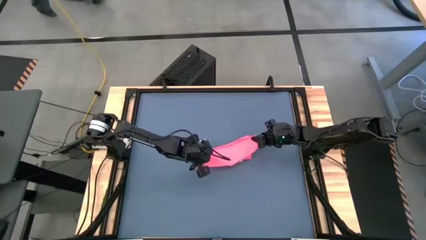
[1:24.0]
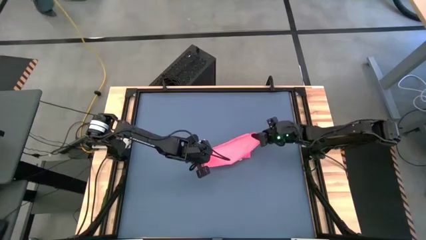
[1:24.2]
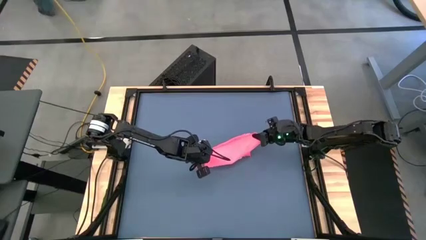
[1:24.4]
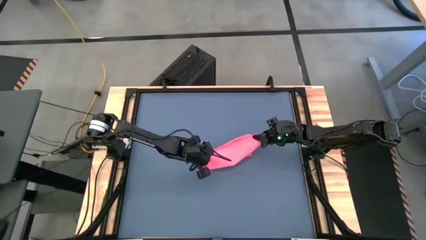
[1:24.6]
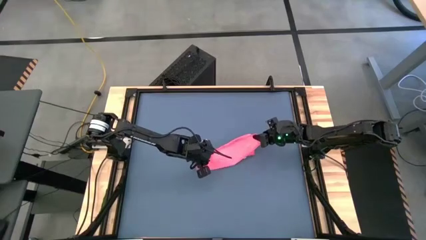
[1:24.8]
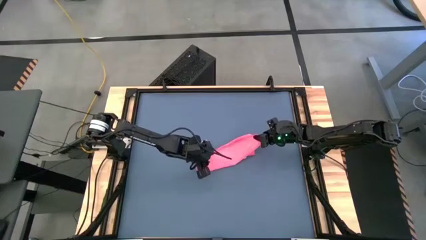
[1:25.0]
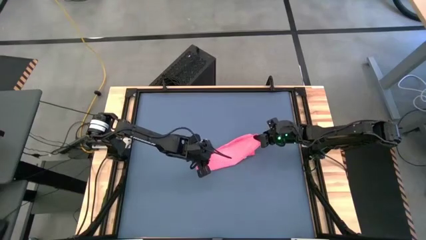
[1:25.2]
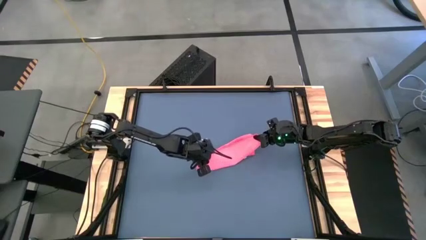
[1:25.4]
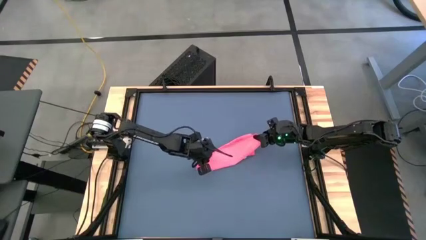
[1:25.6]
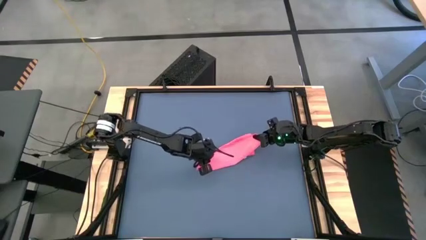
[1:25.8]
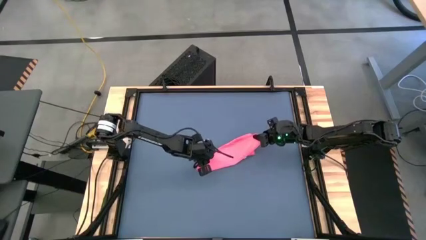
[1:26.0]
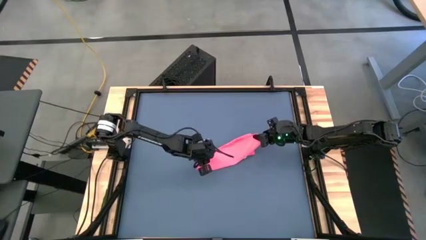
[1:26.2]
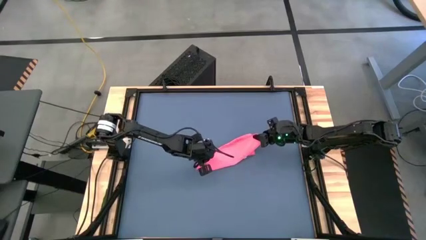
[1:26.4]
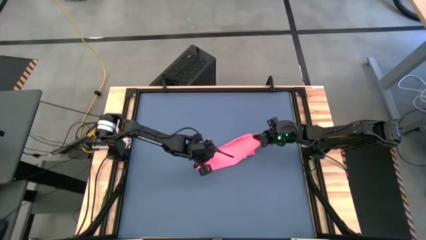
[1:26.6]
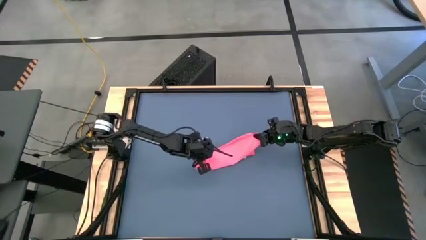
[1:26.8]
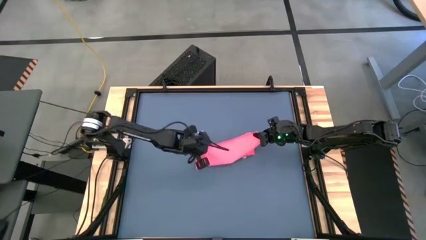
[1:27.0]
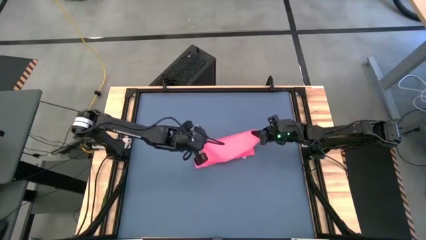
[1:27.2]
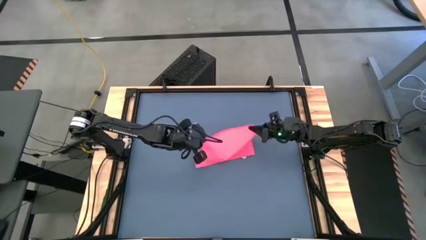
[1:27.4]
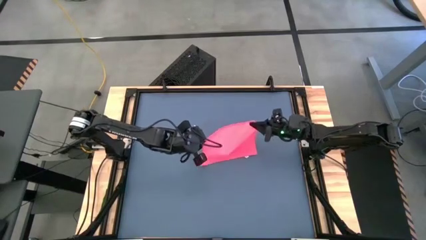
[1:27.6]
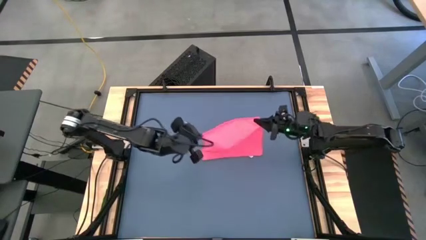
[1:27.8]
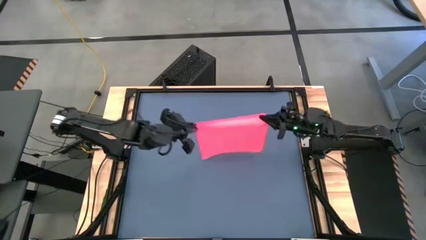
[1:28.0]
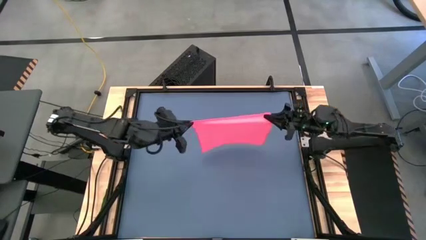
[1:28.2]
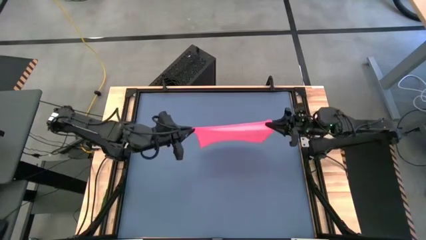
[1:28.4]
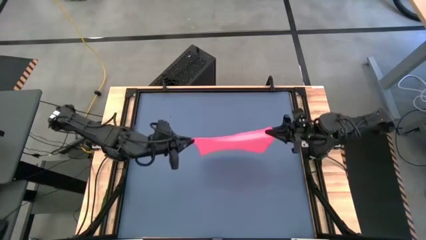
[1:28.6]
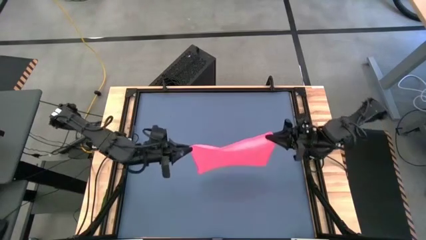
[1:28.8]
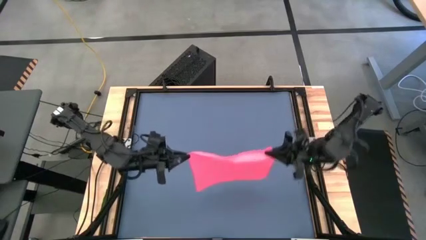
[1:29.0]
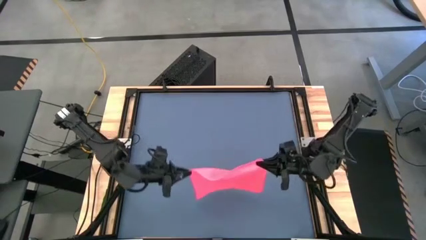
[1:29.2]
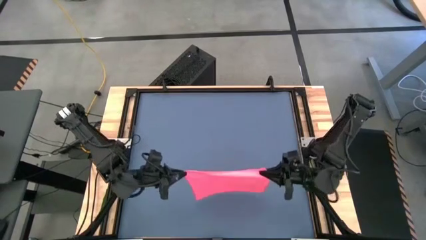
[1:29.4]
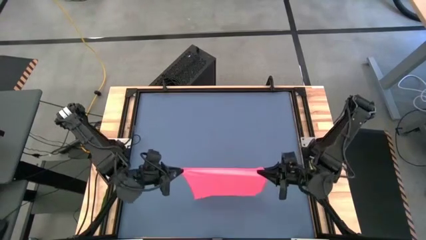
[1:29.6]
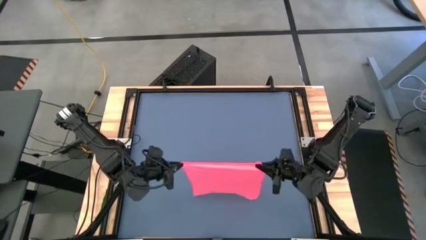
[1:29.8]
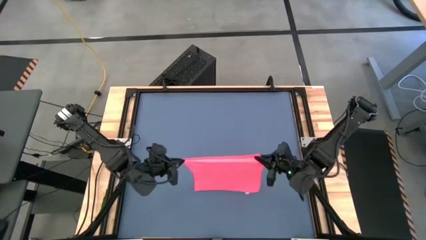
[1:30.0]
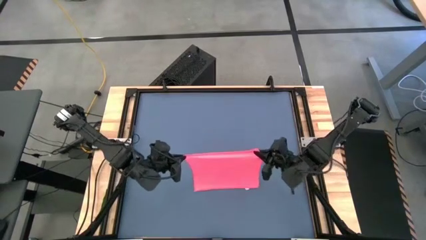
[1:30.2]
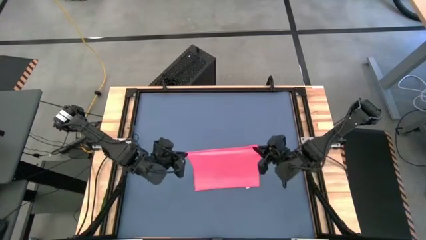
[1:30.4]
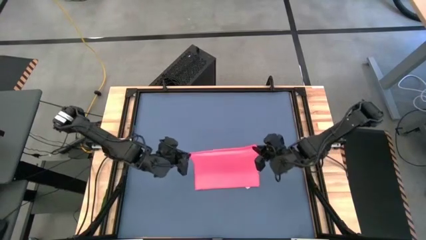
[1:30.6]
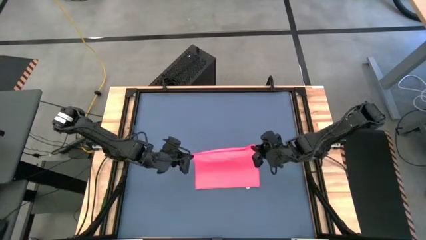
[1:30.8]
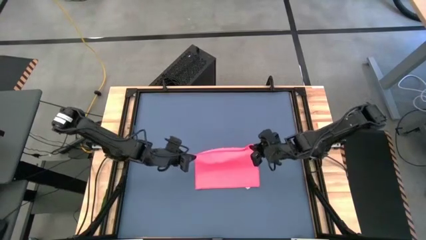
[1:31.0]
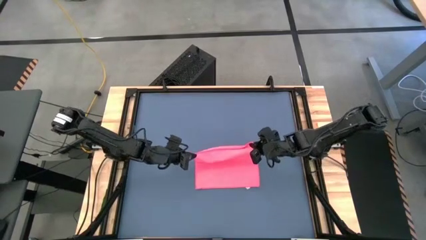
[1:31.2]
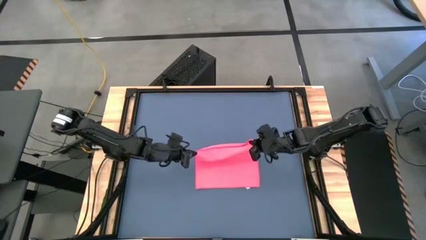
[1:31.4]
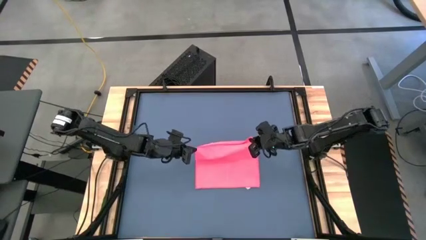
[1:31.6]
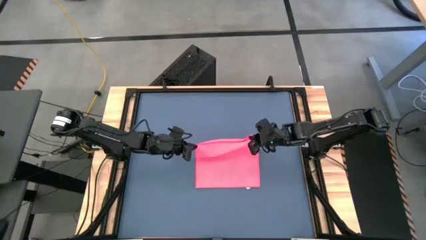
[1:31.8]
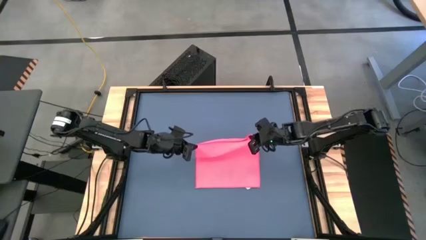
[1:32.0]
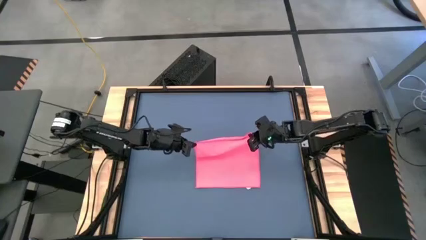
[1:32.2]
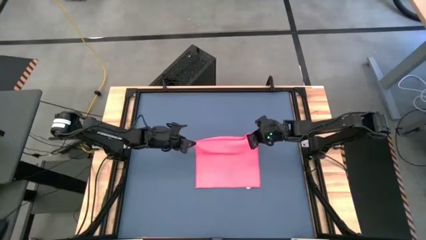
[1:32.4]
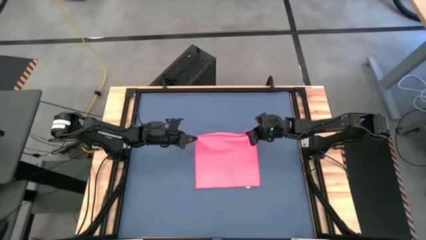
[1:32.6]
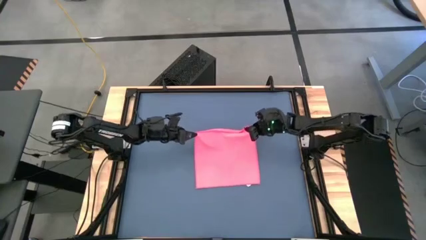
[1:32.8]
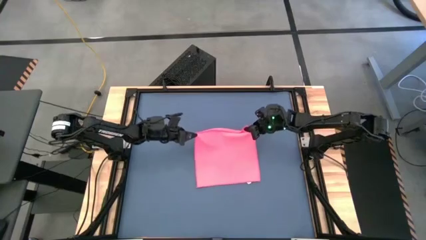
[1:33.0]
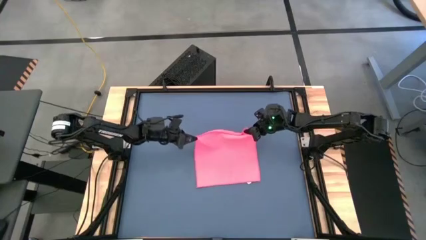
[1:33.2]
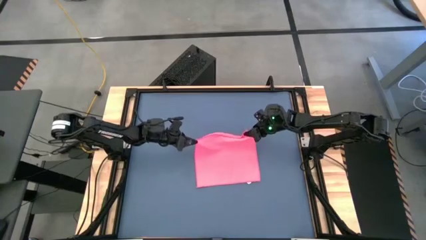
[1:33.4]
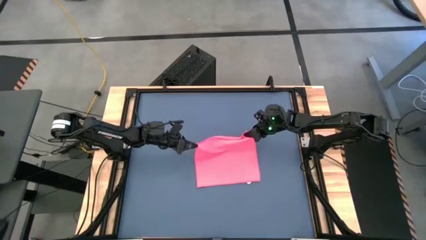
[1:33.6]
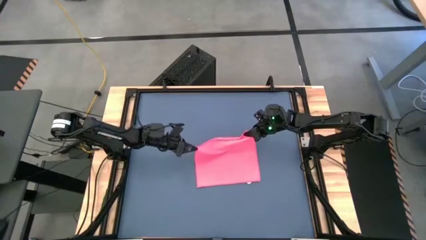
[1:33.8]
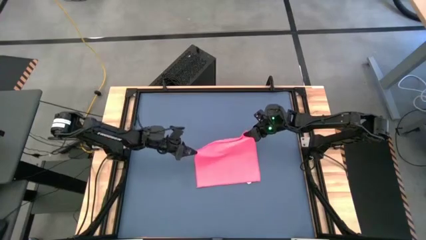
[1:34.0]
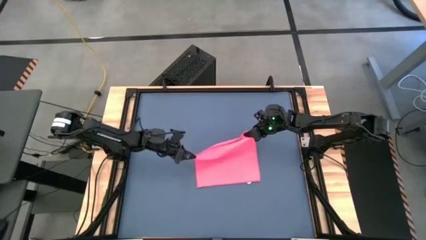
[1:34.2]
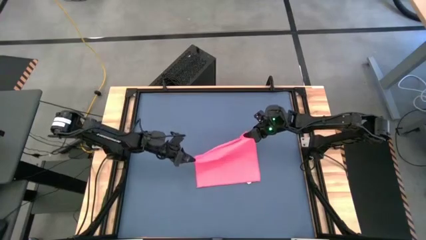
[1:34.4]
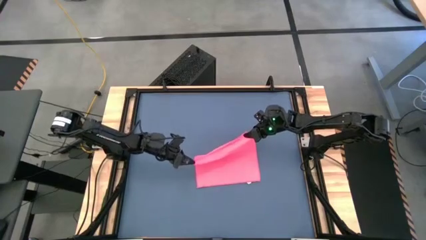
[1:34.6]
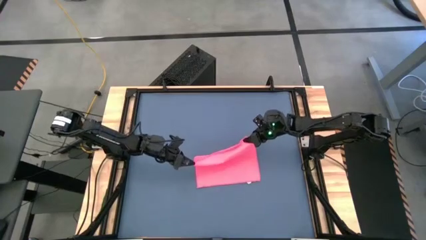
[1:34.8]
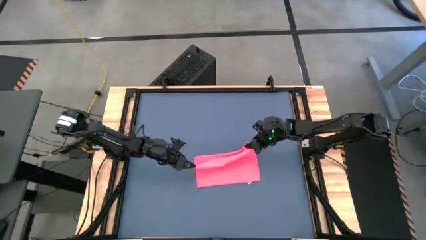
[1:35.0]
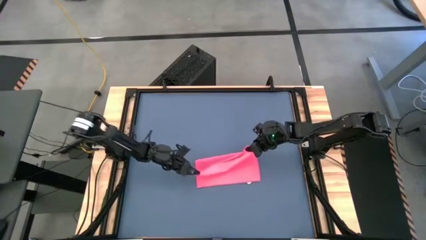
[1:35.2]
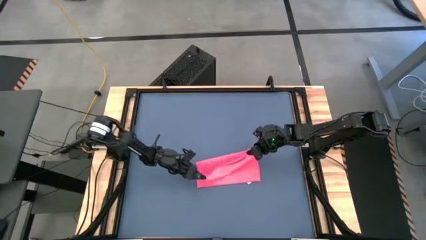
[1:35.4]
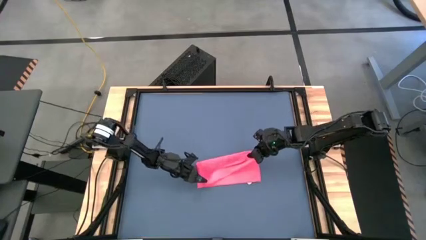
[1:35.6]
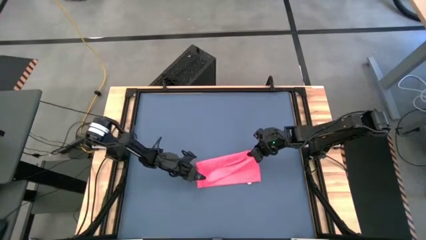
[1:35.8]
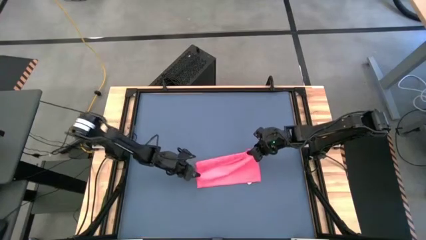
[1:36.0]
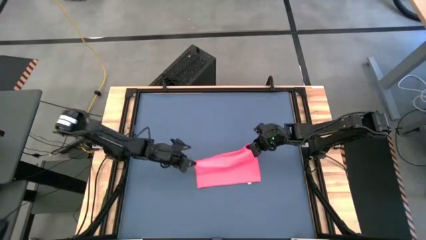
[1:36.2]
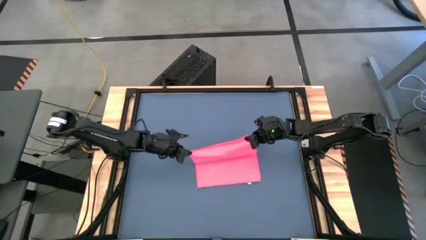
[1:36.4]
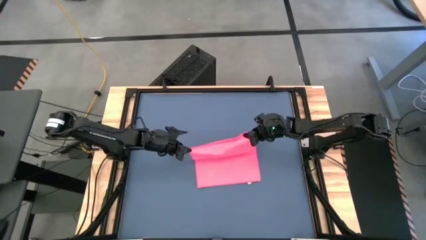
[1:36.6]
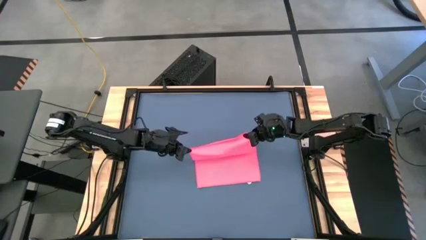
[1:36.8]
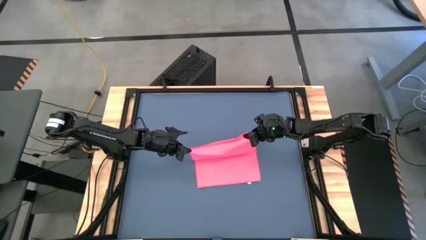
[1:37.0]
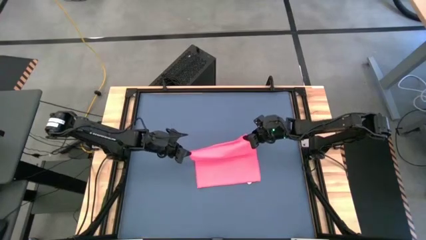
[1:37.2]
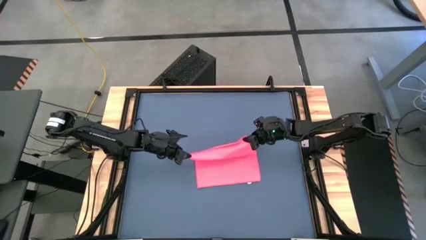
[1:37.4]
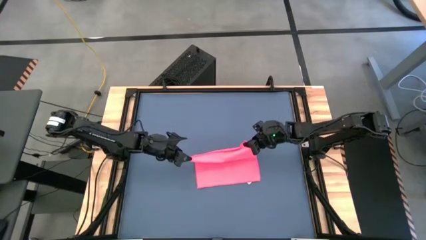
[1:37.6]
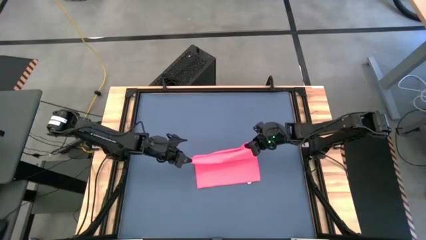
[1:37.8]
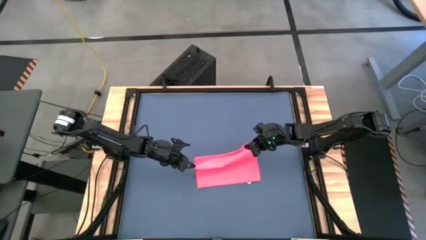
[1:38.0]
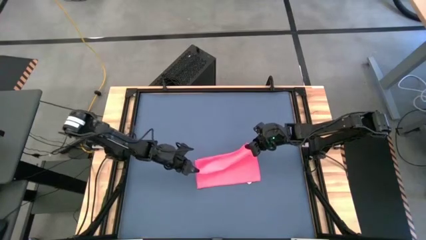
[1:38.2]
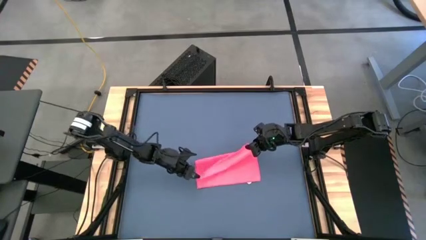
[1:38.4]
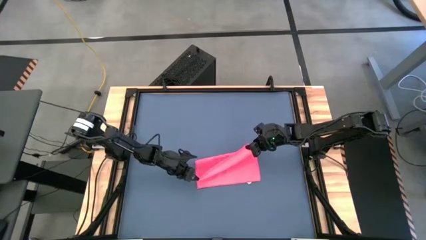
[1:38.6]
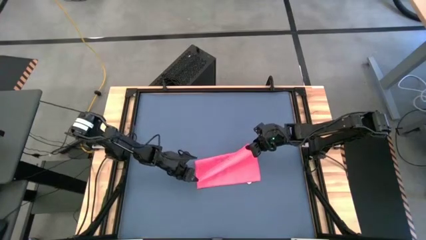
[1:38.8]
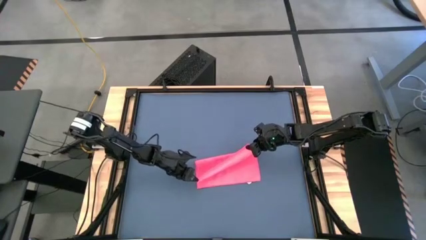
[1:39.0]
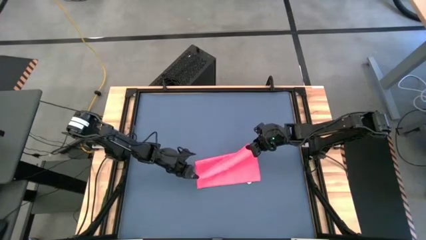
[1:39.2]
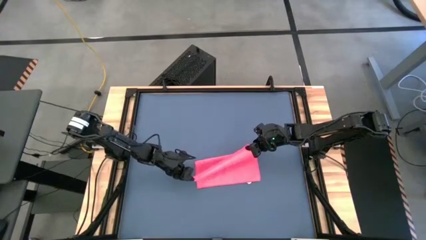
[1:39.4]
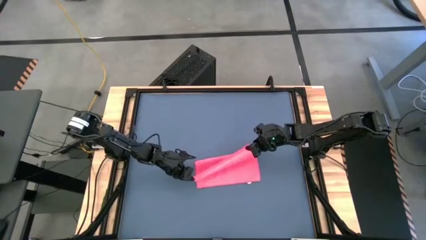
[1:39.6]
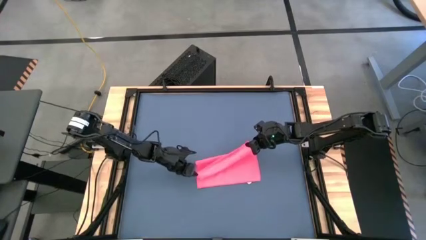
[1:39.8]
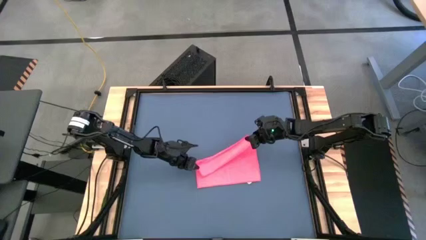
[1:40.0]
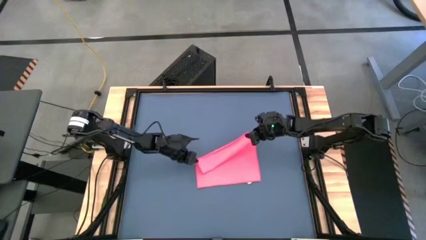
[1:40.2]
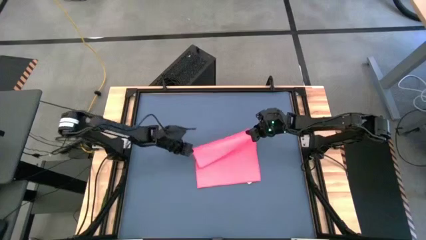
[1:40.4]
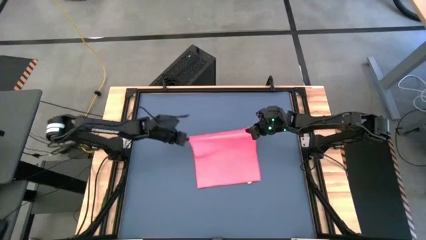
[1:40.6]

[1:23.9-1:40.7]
Task: Roll towel
Fold the pink towel
